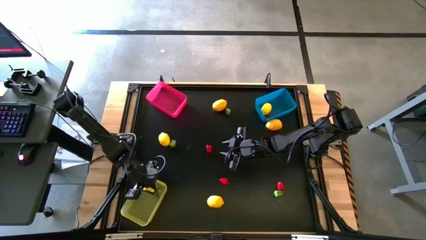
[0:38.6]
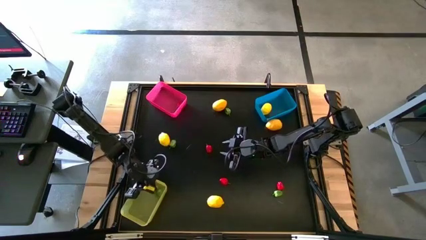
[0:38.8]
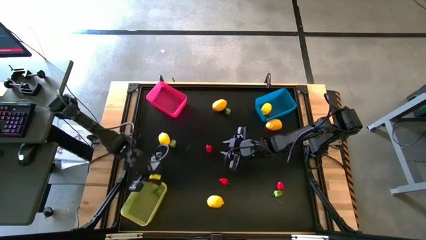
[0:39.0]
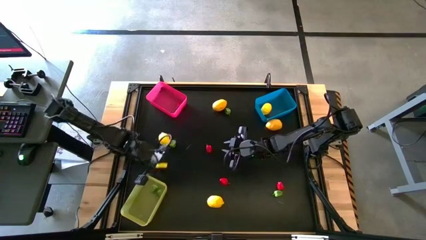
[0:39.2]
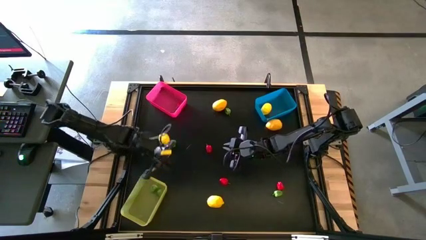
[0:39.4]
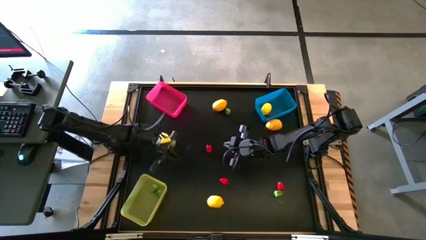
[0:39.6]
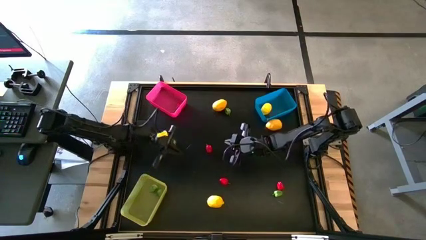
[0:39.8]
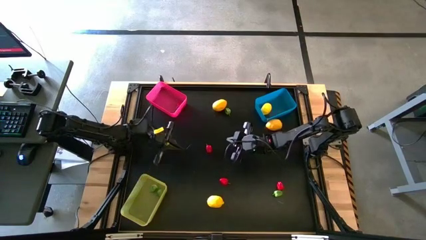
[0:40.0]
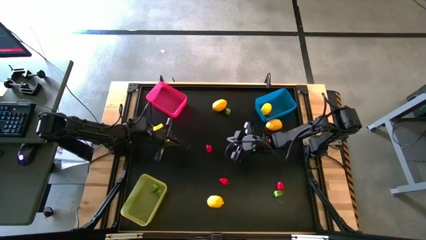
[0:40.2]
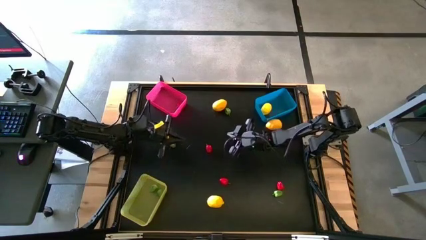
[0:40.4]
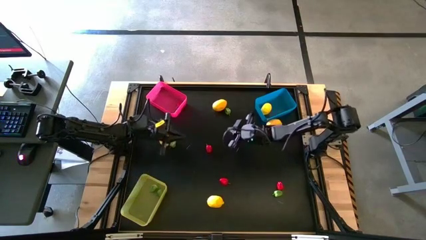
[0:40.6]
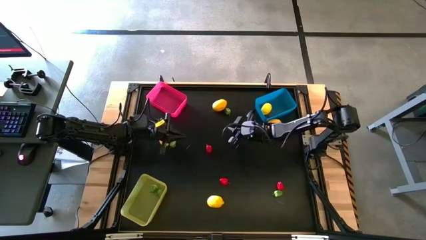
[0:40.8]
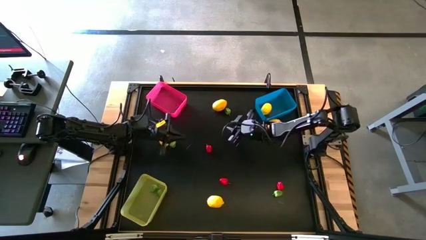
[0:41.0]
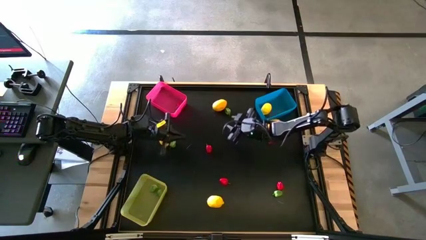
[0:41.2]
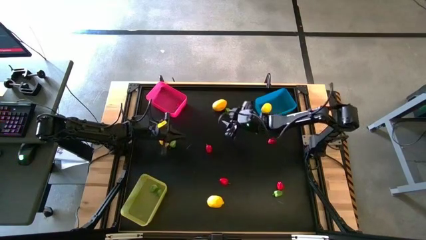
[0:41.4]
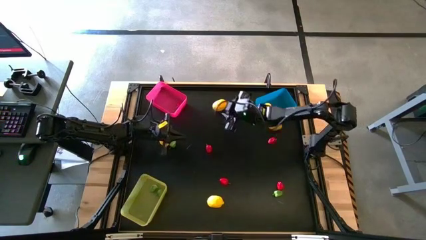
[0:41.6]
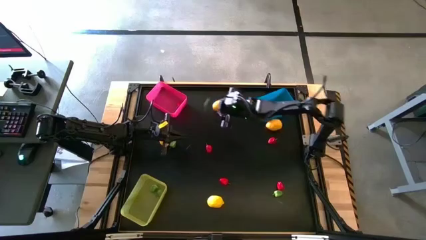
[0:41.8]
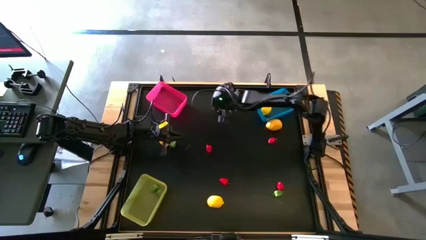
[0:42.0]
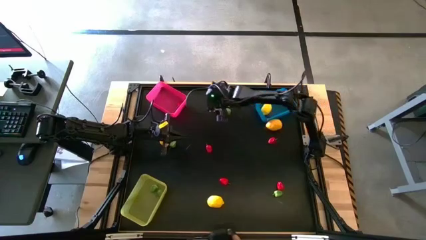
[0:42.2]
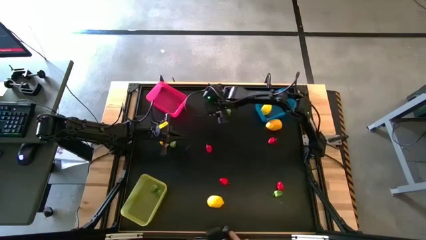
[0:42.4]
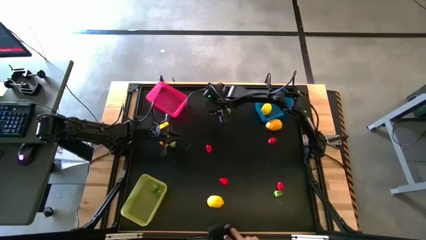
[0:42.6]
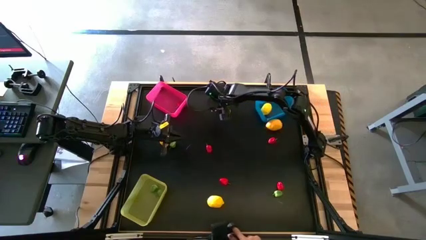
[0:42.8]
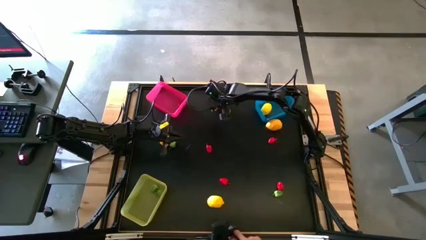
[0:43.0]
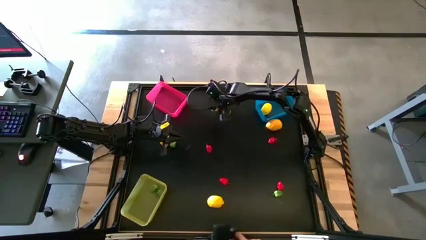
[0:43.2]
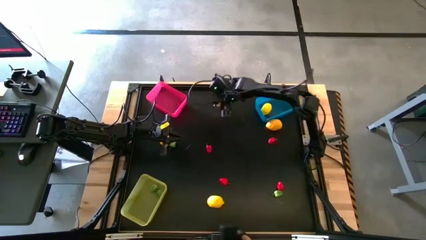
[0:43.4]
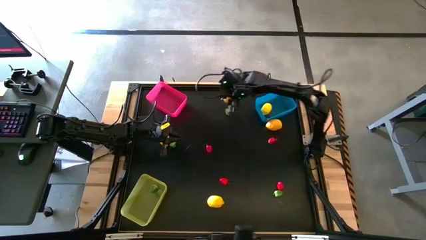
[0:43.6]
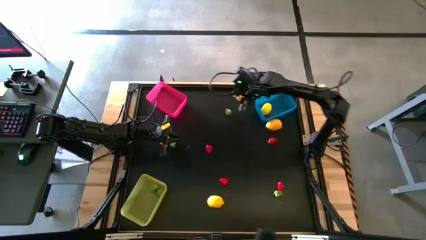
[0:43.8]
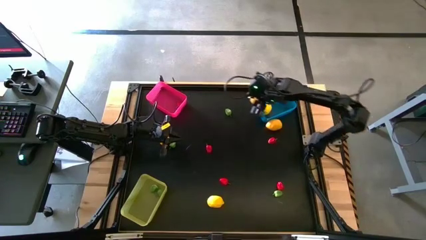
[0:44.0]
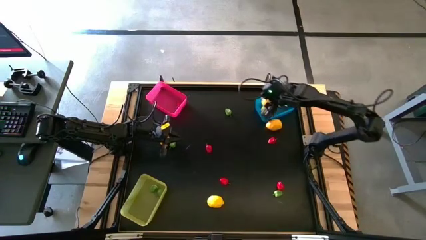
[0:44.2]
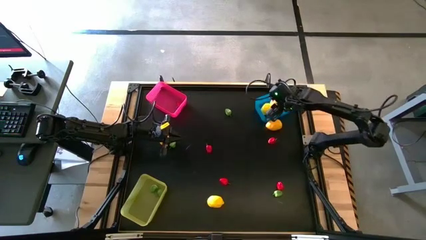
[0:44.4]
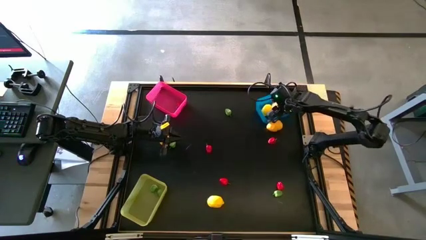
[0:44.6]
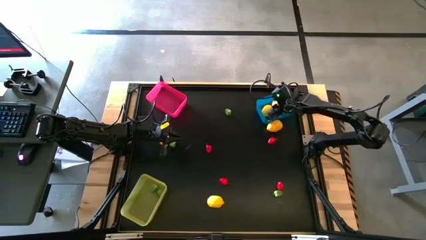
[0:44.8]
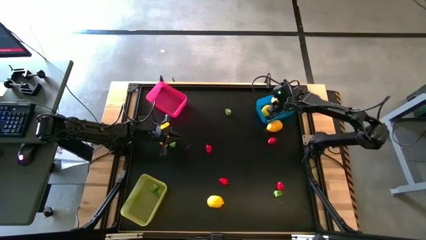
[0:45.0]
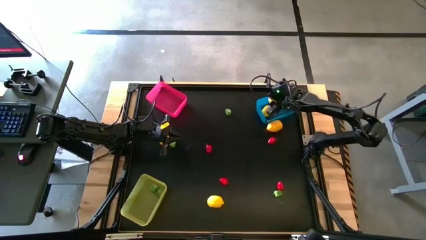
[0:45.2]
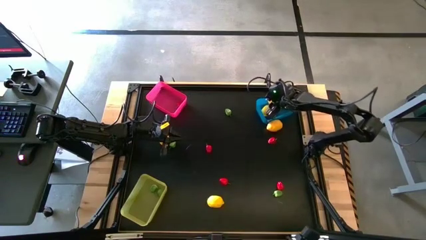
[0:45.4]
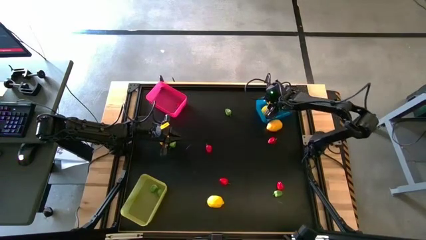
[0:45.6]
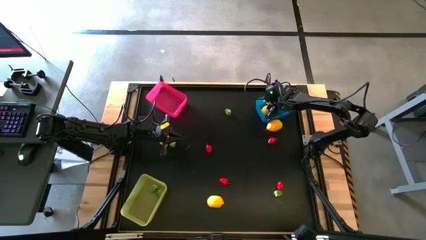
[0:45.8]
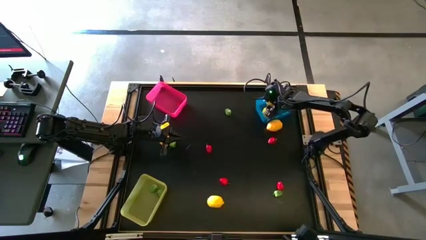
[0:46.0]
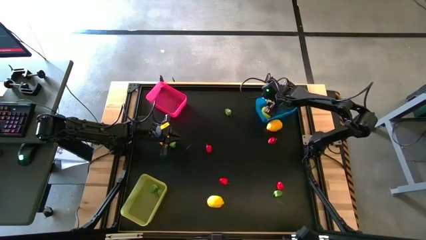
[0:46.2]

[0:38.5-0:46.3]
Task: Sort produce into baskets
Put the yellow lemon into the blue bin

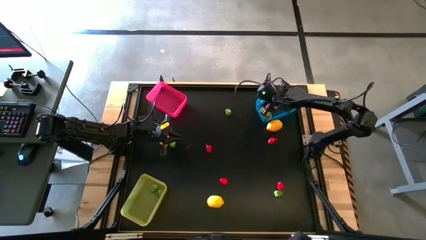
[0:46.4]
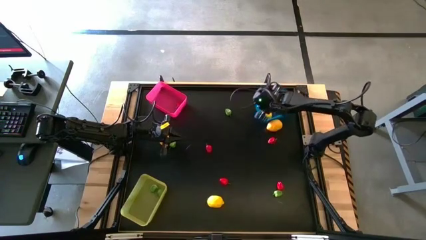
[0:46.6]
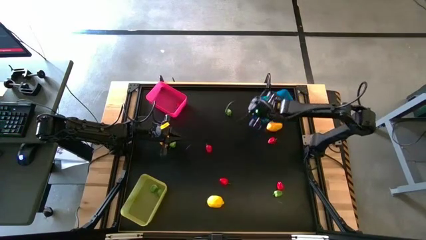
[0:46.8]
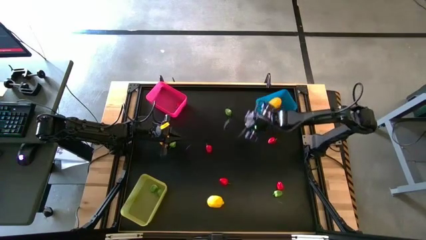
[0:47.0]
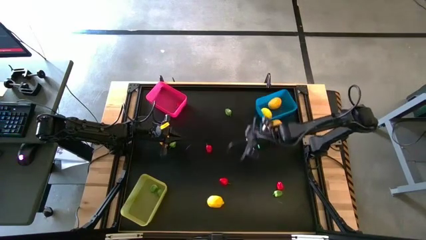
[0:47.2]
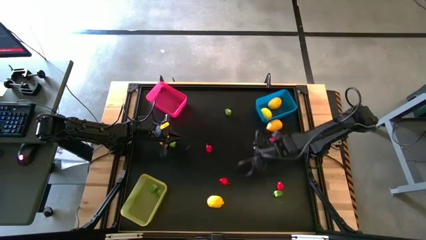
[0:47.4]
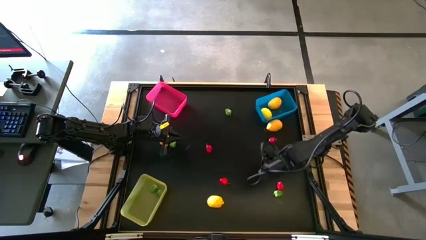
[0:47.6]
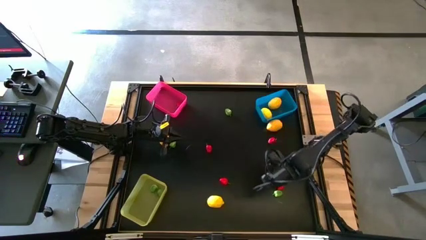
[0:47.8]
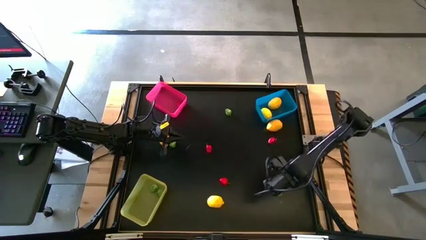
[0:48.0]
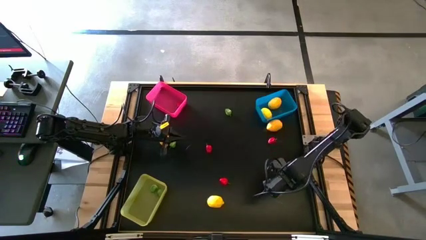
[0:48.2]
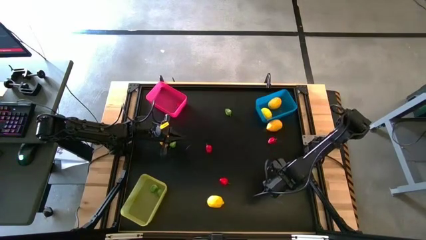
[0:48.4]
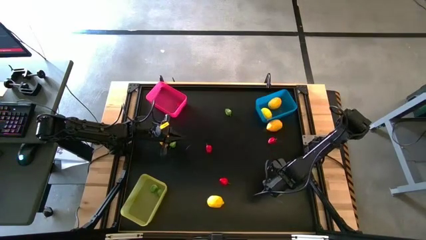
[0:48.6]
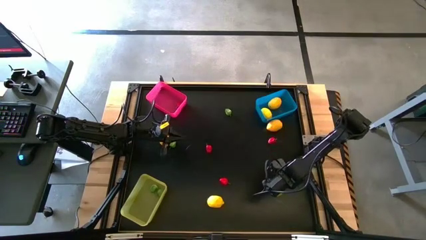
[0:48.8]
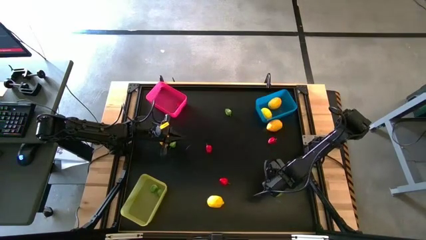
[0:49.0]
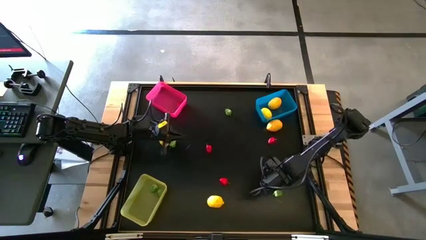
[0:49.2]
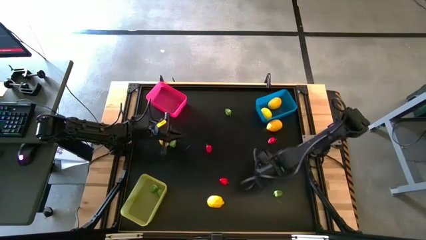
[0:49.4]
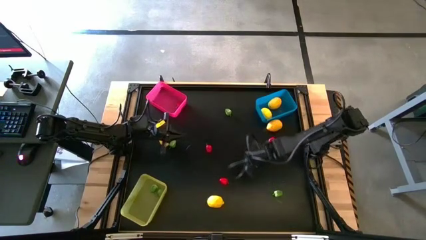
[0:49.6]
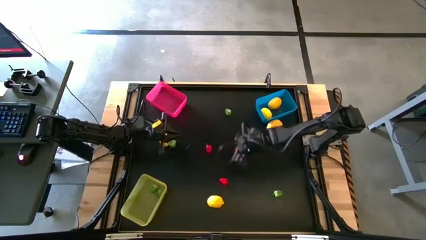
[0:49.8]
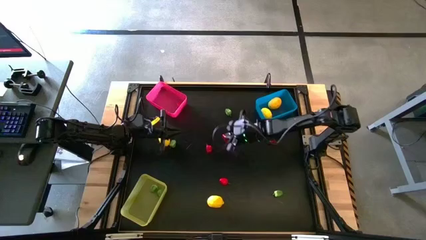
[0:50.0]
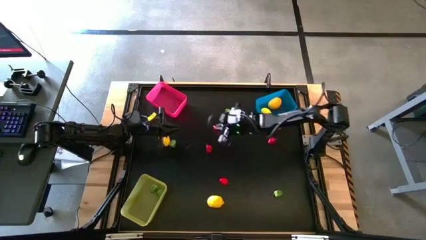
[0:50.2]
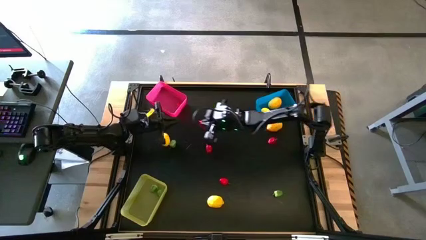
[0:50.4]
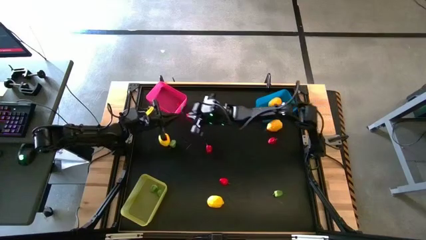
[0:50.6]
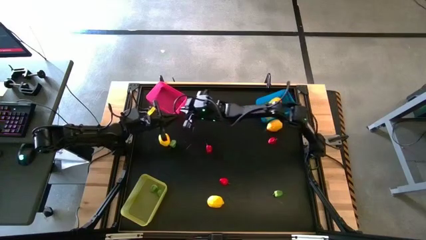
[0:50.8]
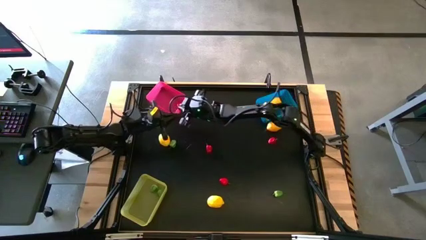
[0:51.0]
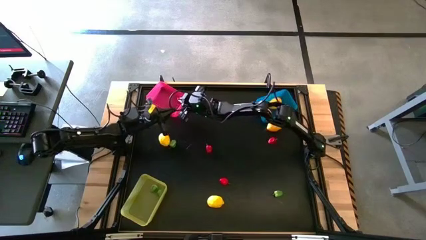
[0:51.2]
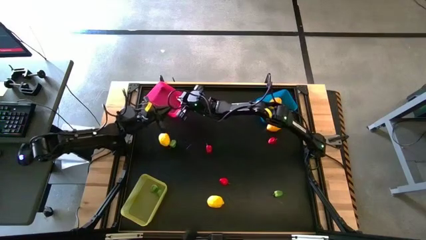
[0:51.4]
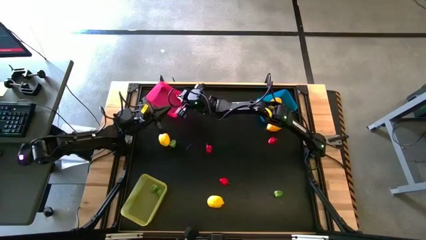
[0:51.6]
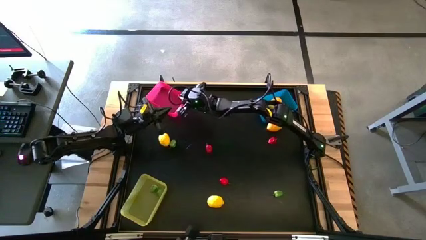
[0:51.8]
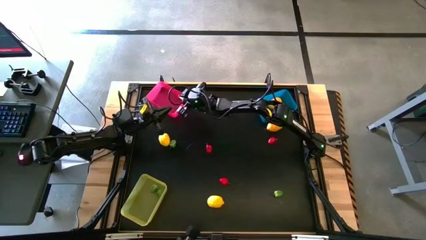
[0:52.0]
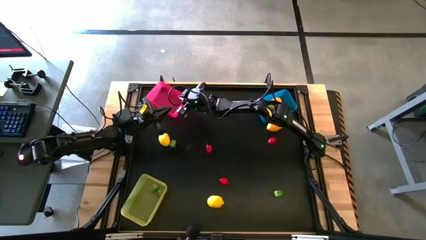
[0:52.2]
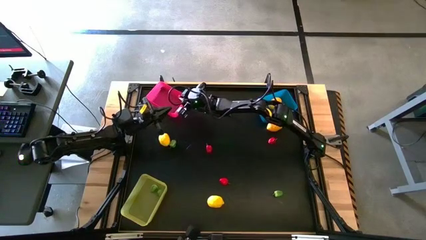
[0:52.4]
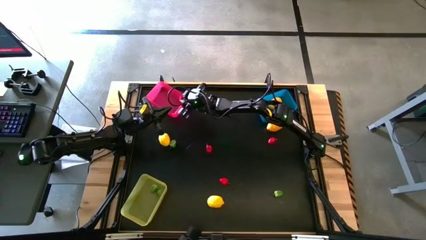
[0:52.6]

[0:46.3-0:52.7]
Put the red bell pepper into the red bin

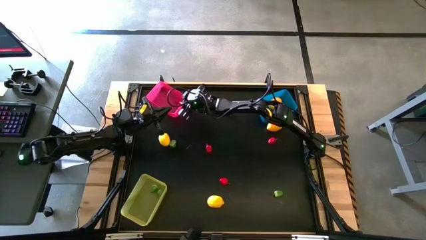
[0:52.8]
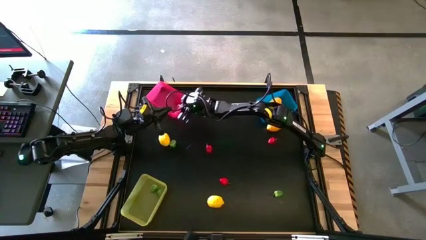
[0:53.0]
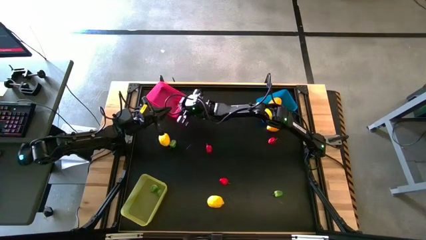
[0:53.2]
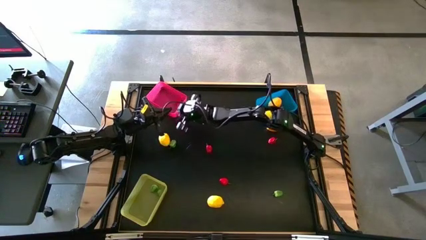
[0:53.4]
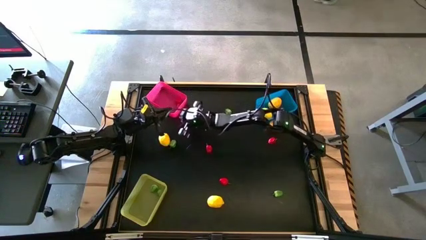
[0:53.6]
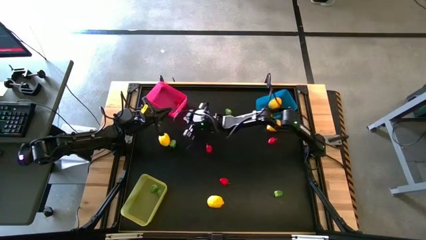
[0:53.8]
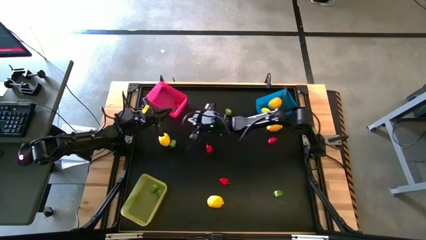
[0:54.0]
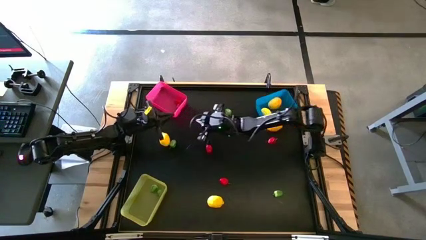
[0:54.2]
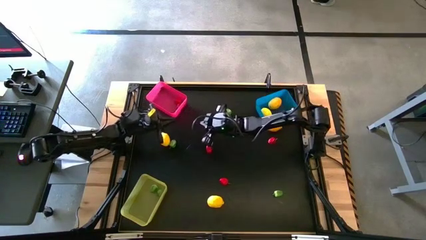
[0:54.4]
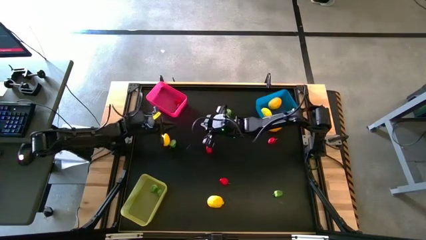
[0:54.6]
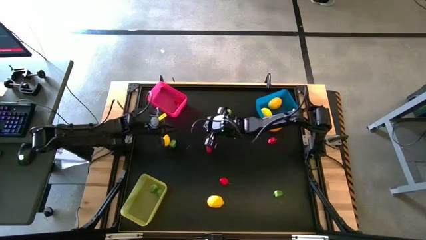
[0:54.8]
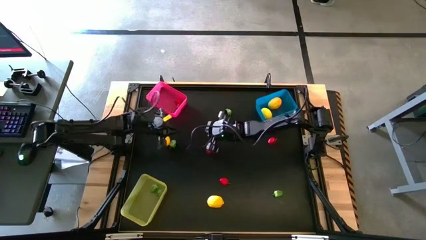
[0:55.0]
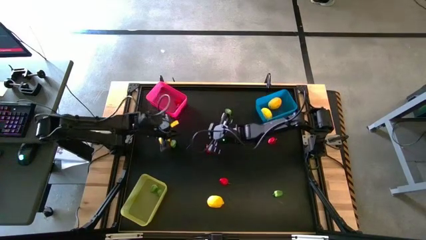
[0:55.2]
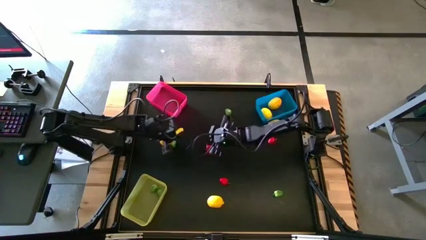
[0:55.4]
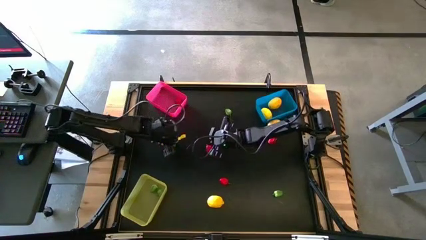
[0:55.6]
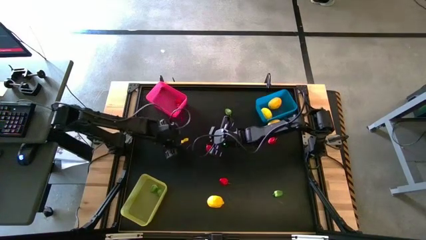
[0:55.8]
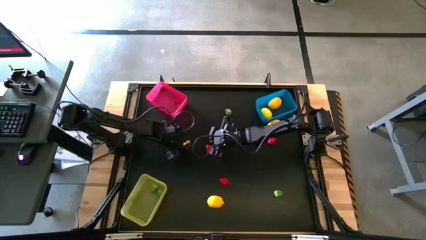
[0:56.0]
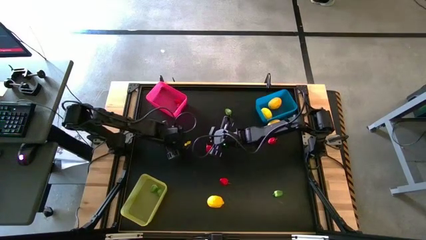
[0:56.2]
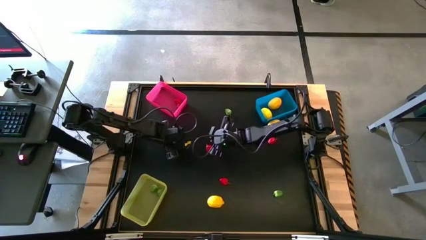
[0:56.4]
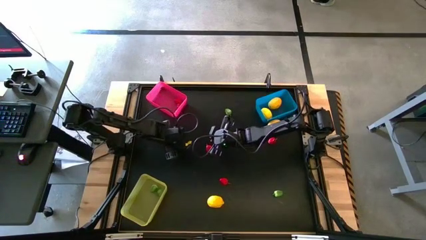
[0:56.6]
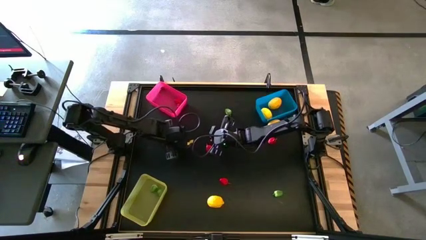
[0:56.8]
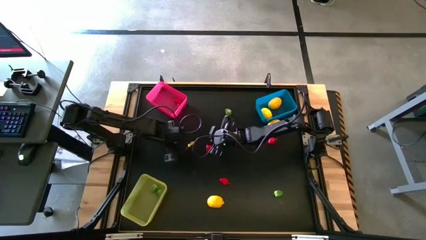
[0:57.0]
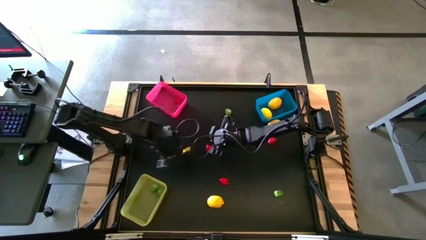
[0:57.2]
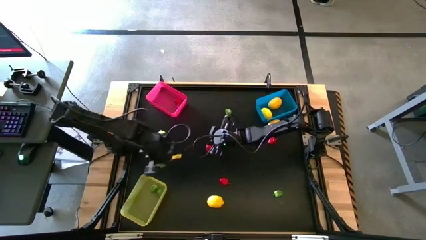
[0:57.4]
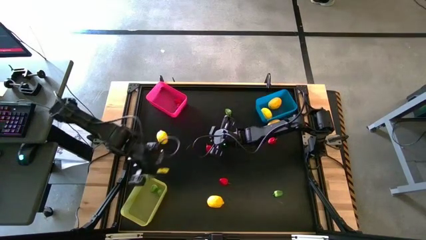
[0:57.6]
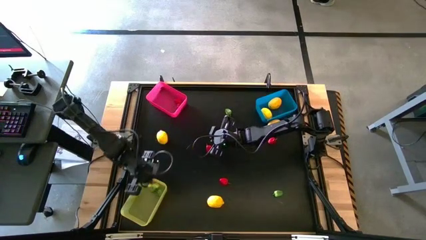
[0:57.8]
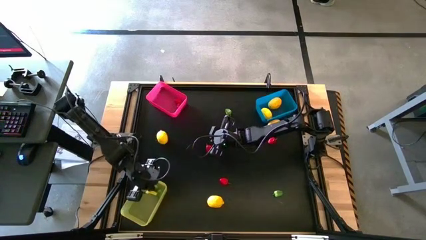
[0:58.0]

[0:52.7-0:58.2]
Put the green bell pepper into the yellow bin
